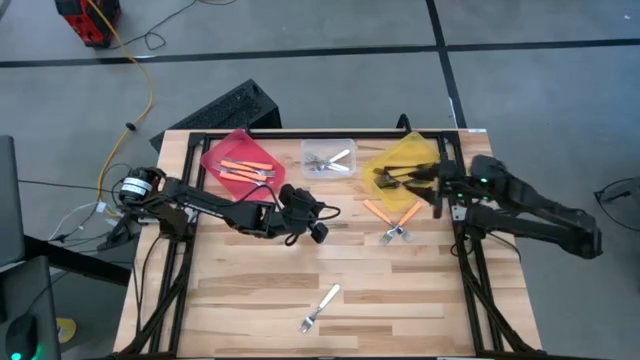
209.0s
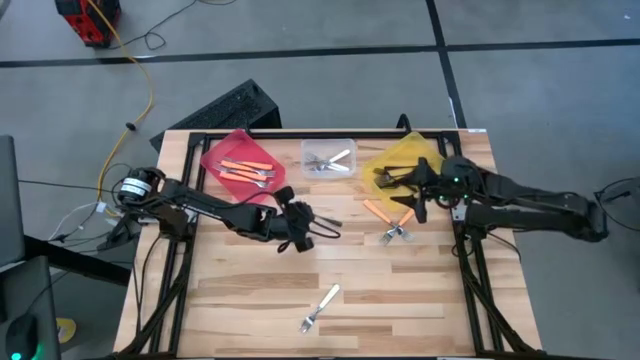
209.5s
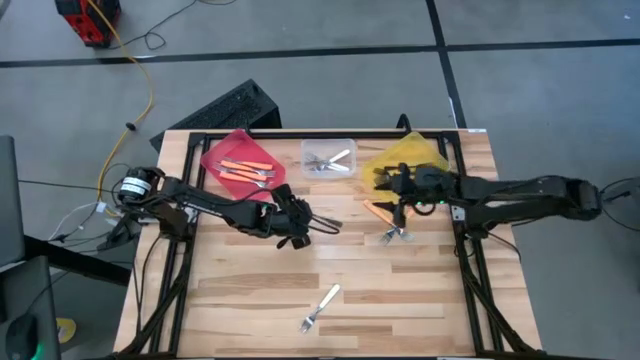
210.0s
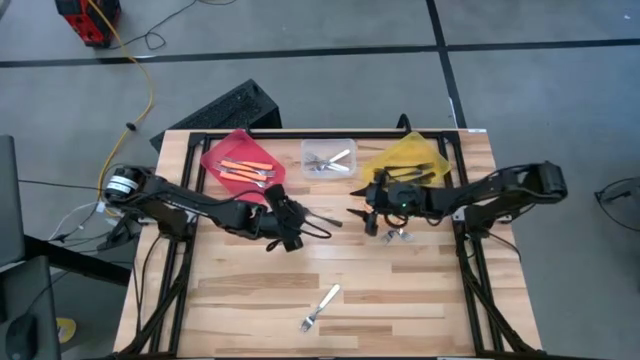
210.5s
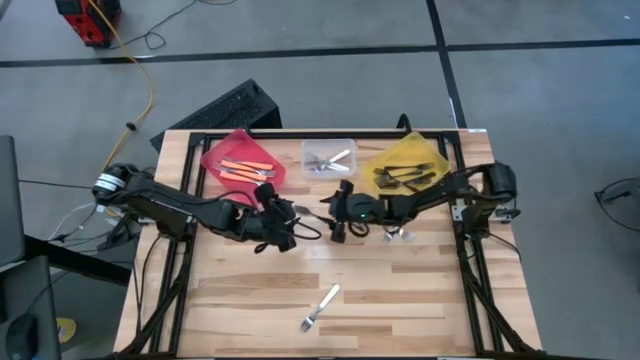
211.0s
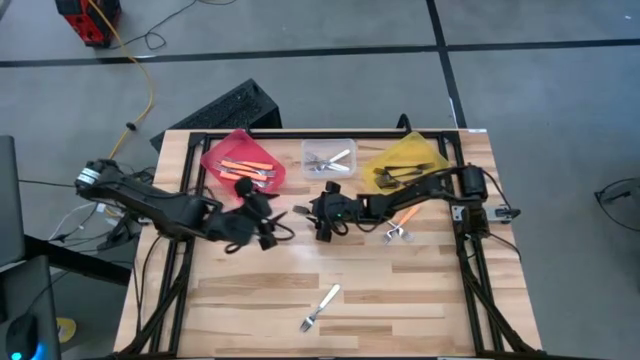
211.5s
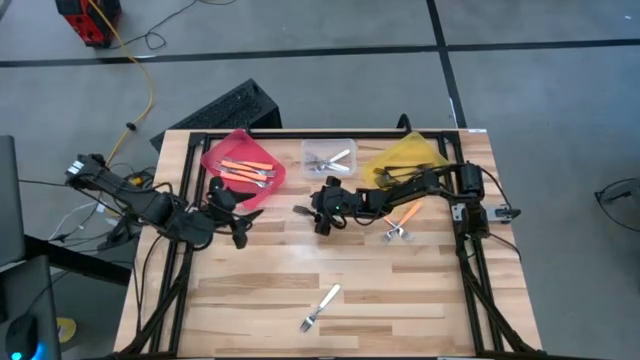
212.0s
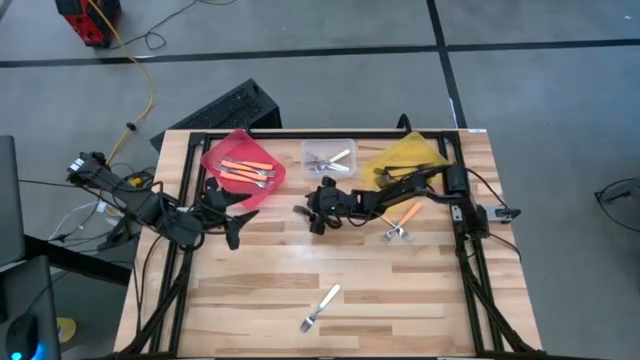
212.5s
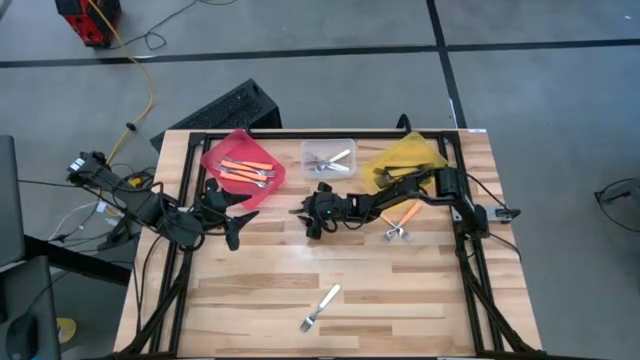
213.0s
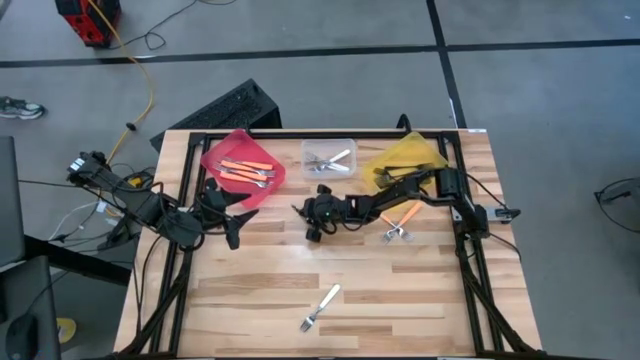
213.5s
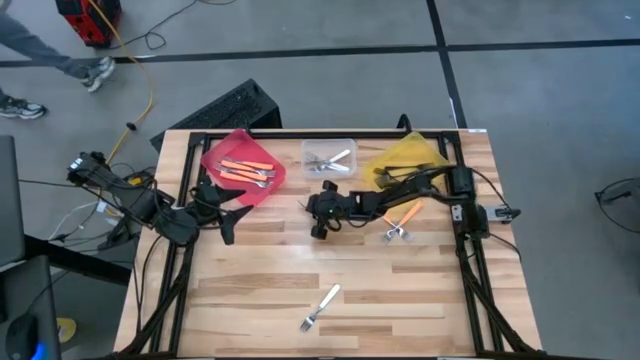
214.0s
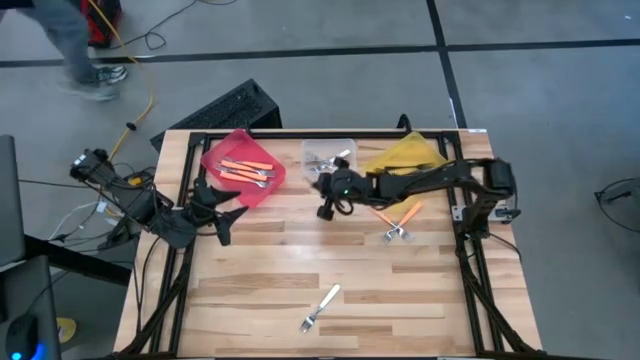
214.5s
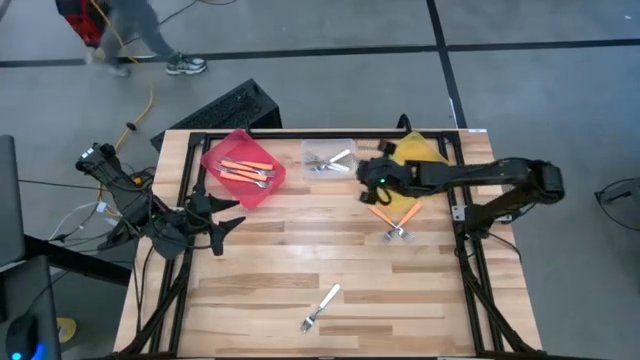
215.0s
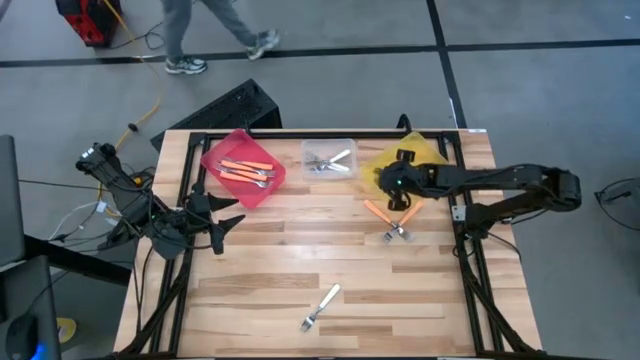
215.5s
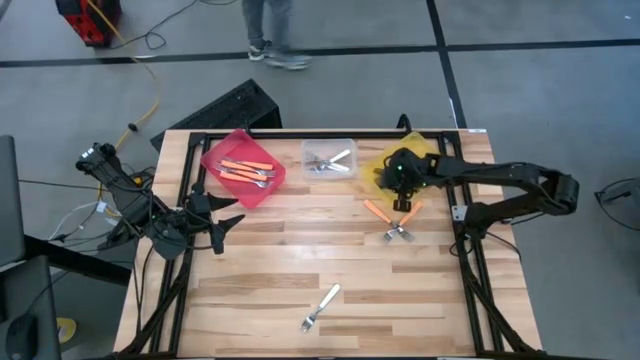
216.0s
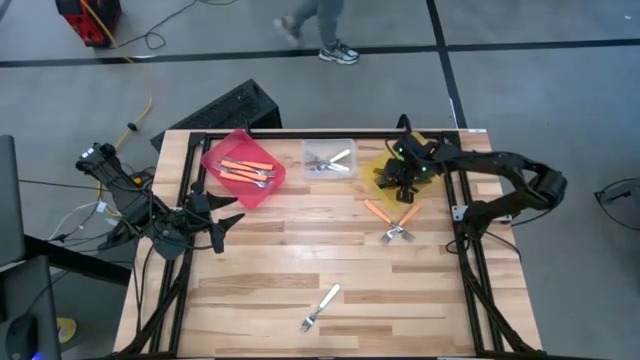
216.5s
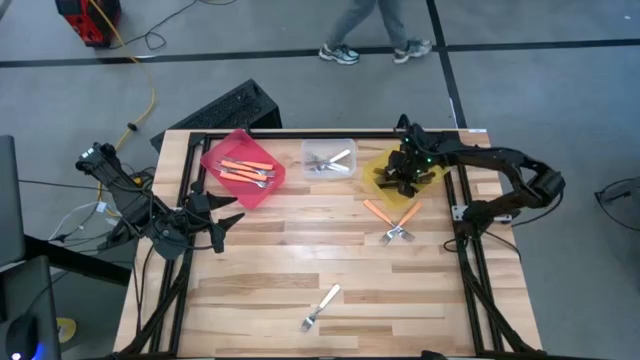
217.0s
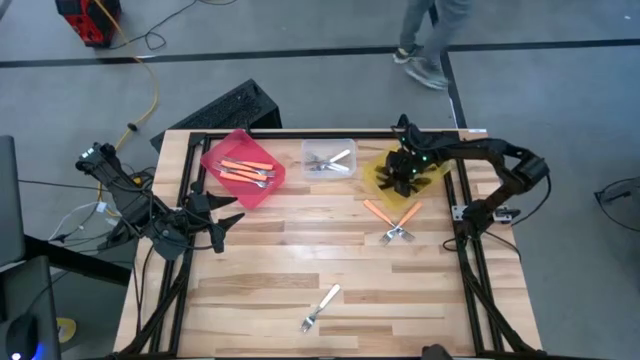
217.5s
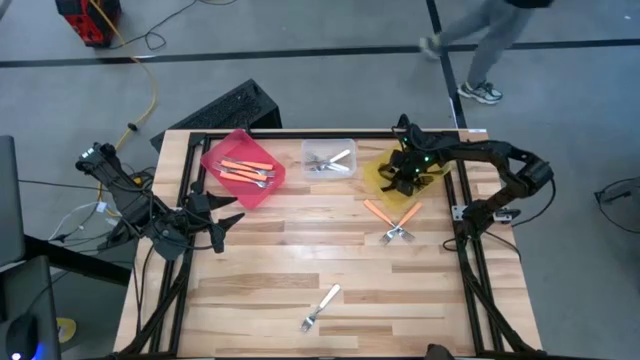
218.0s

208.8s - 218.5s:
Task: Sort silverware by color (type)
Put the black fork into the yellow bin

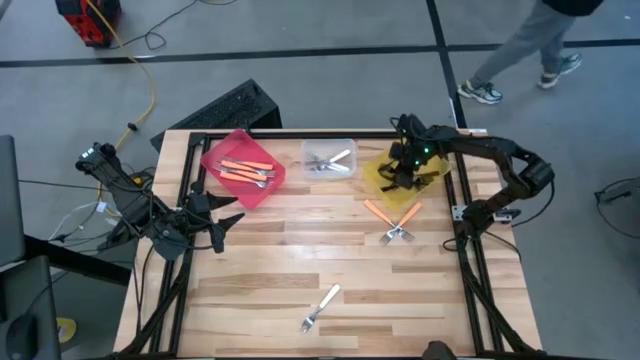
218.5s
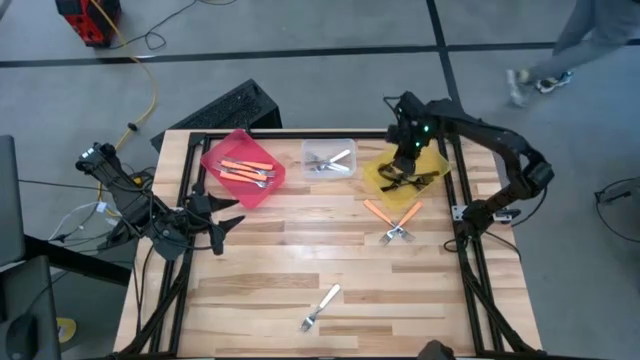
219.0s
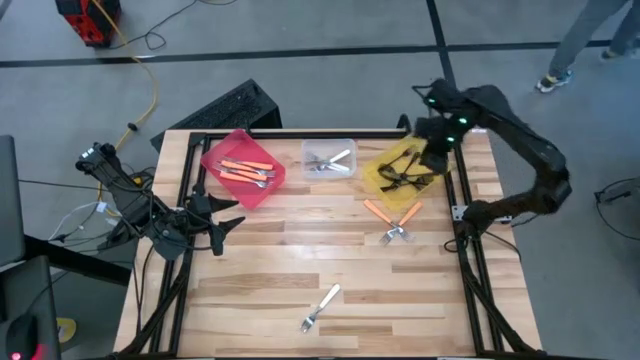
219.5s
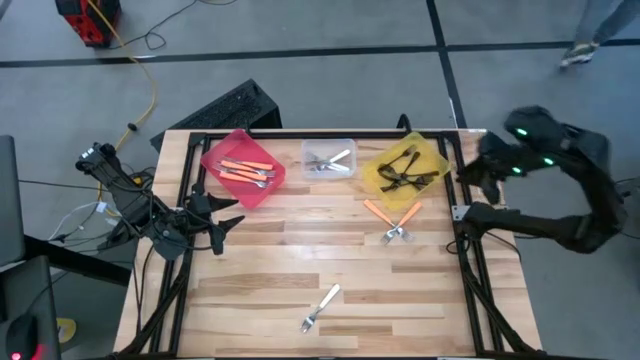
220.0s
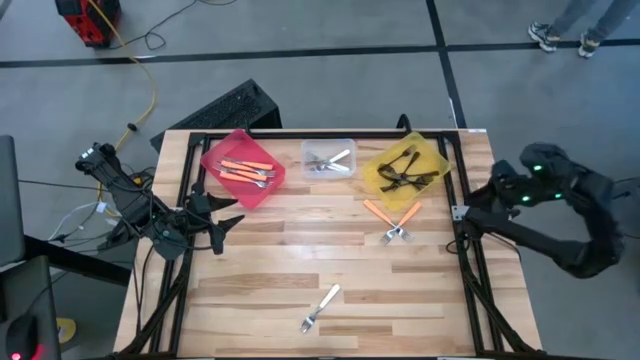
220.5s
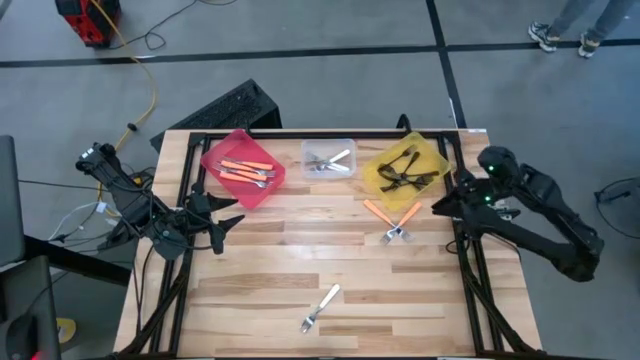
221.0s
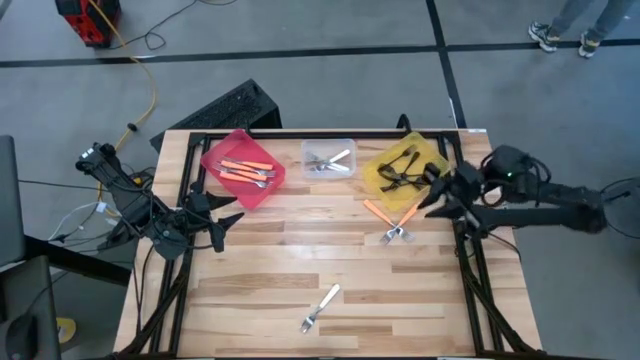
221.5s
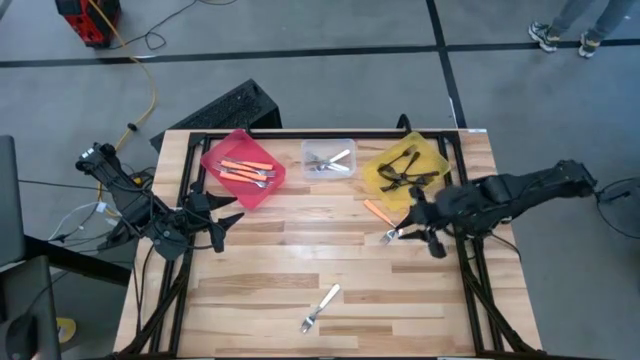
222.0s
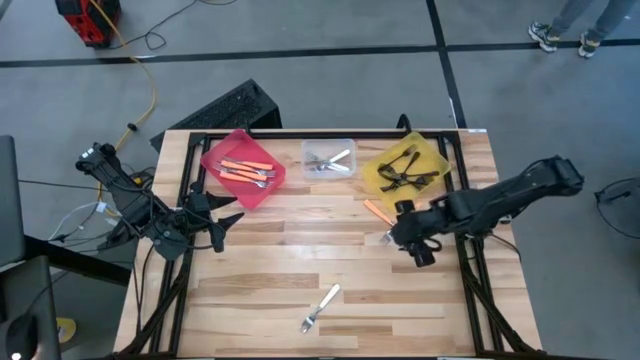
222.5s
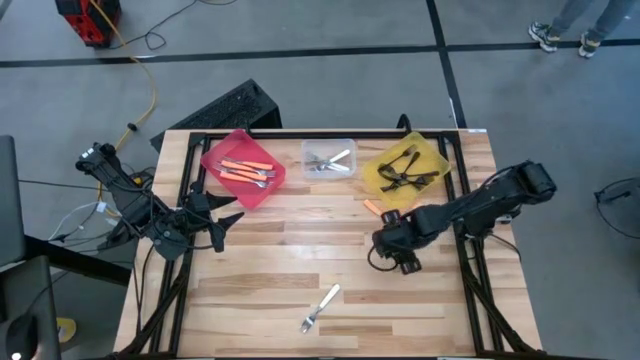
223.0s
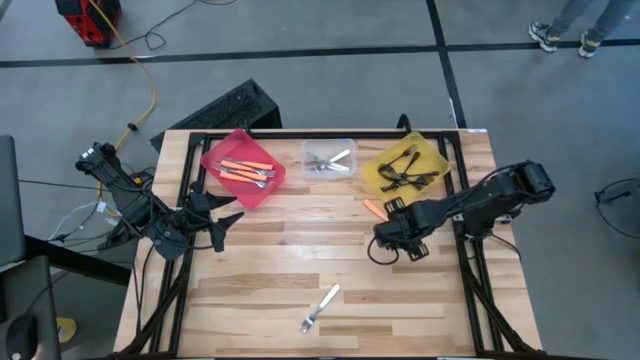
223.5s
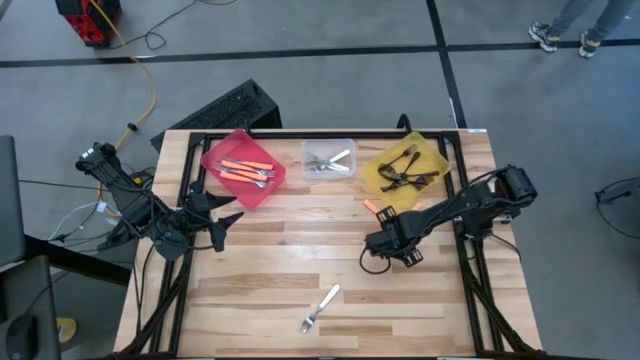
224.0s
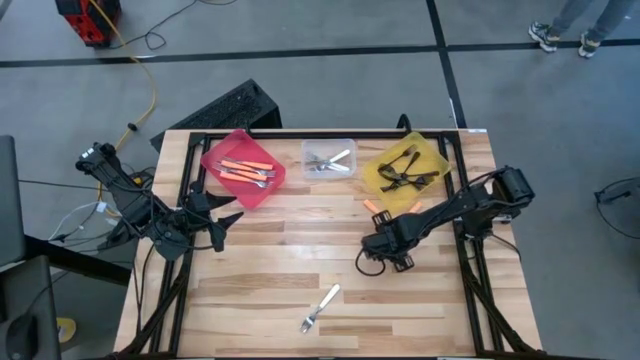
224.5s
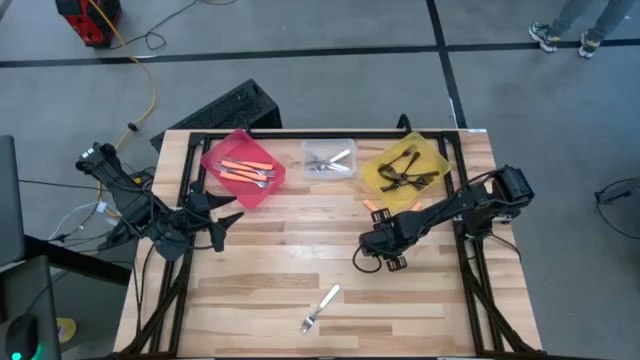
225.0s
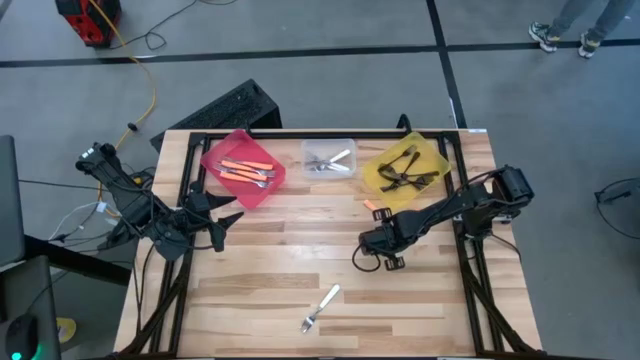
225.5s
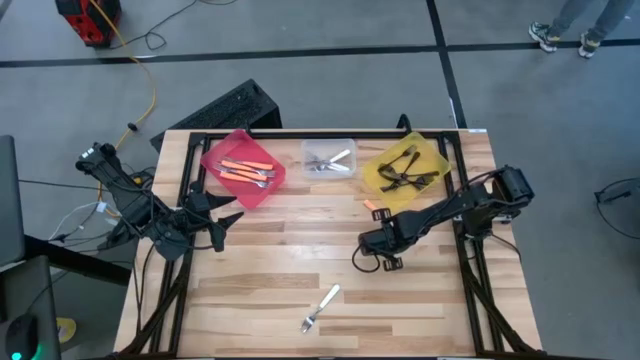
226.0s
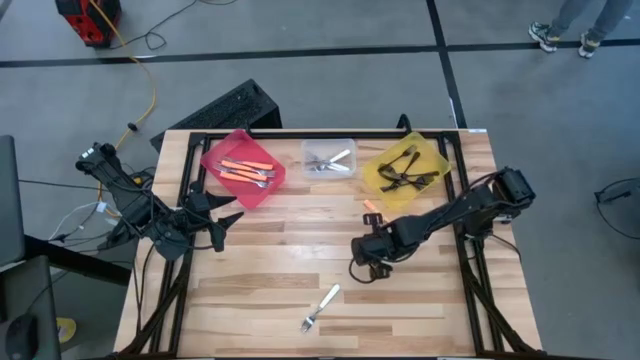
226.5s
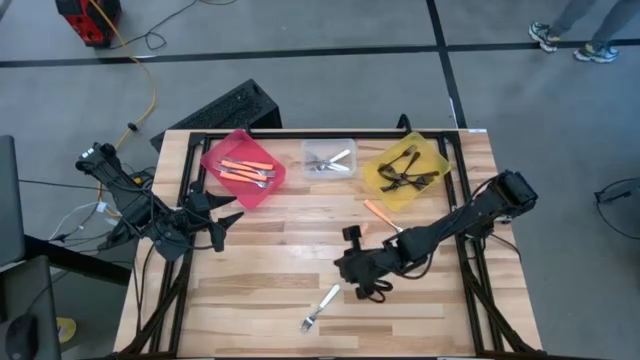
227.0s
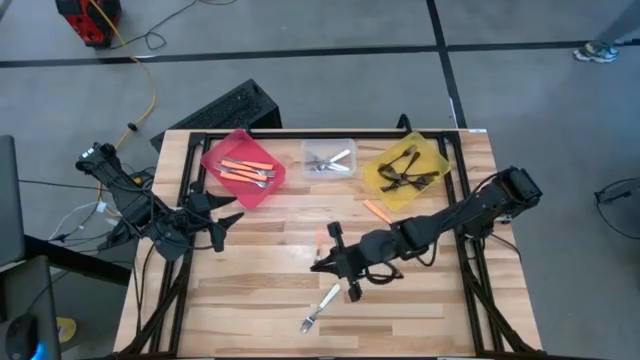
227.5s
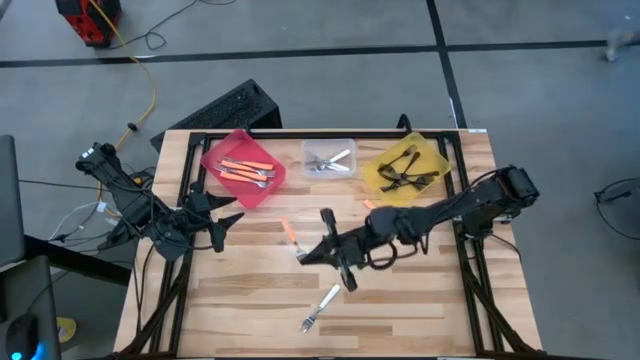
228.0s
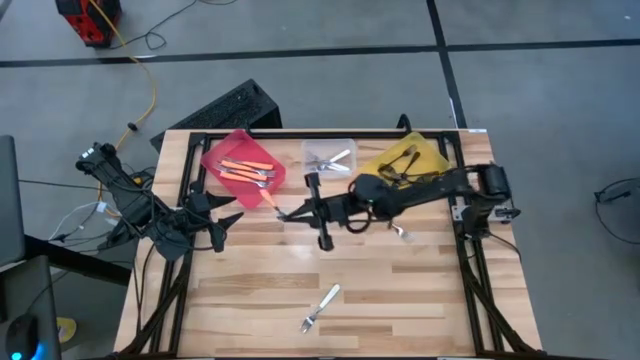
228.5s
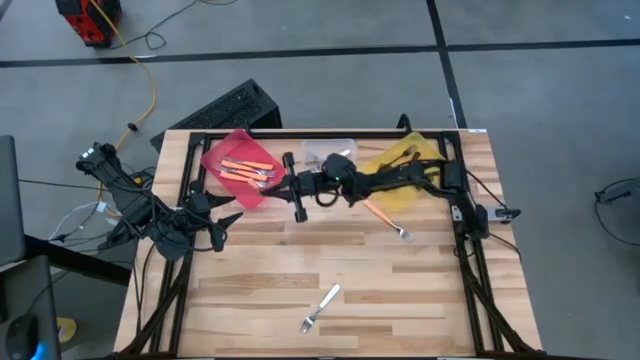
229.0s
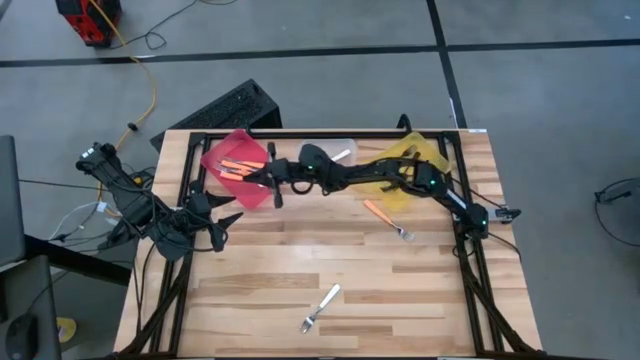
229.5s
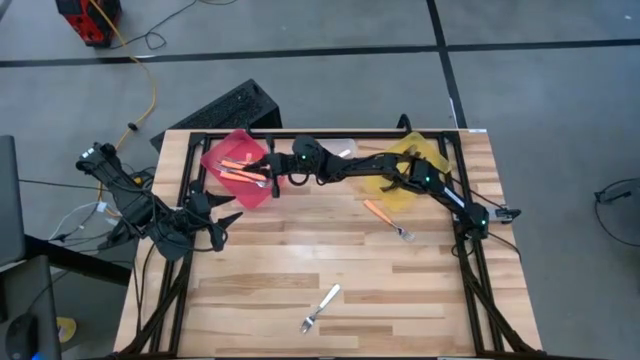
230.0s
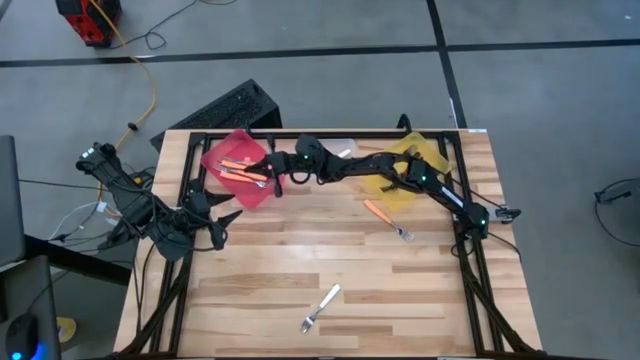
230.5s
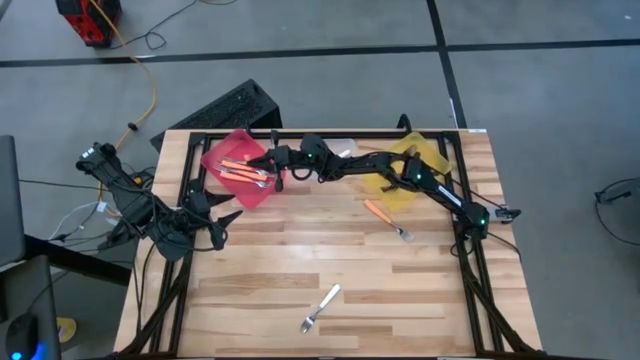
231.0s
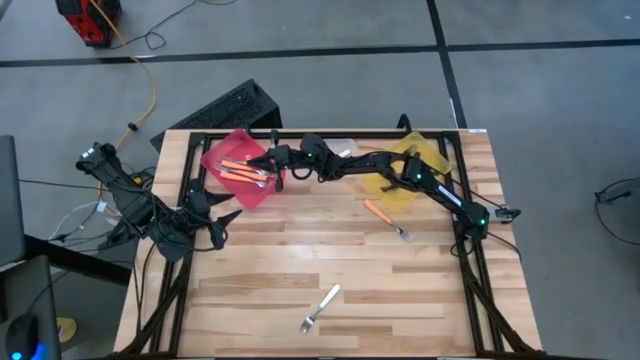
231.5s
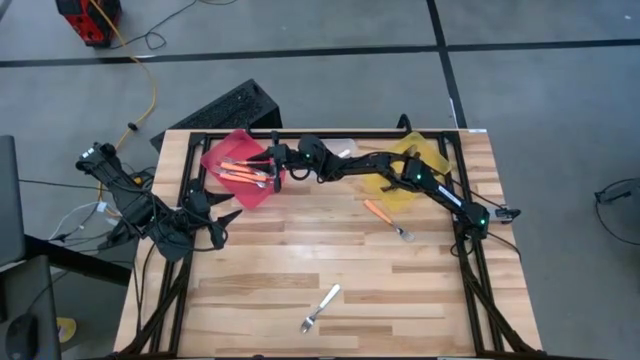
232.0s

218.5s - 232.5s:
Put the orange fork into the red bin
